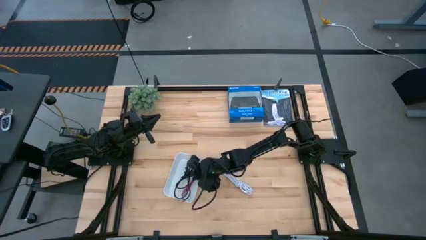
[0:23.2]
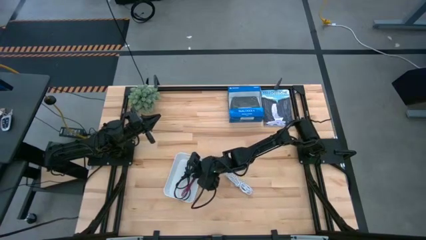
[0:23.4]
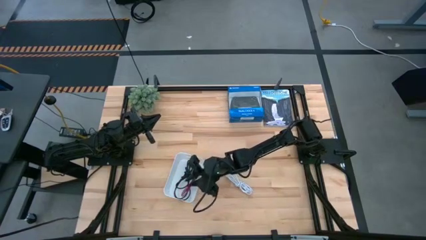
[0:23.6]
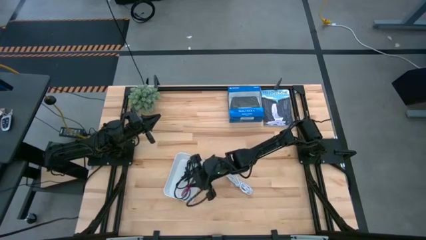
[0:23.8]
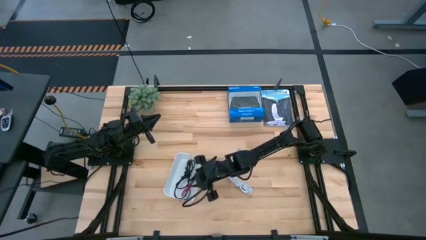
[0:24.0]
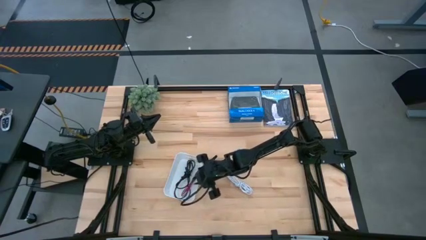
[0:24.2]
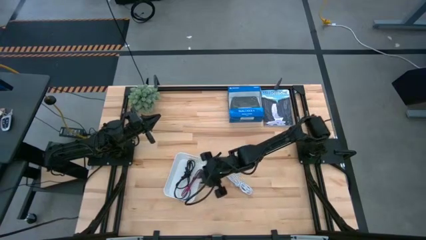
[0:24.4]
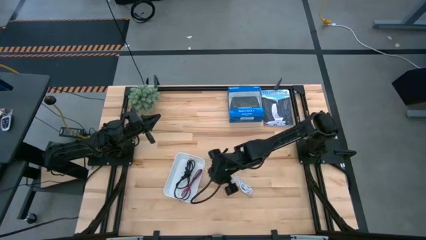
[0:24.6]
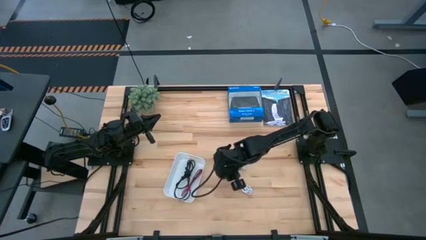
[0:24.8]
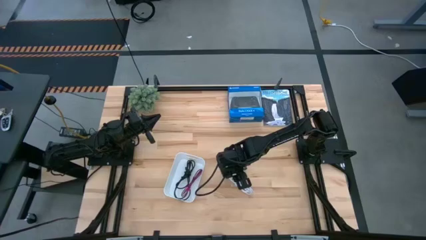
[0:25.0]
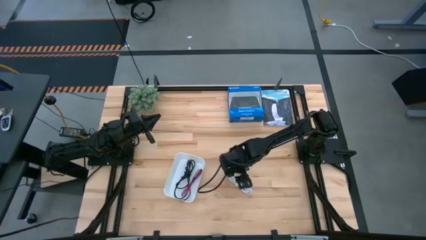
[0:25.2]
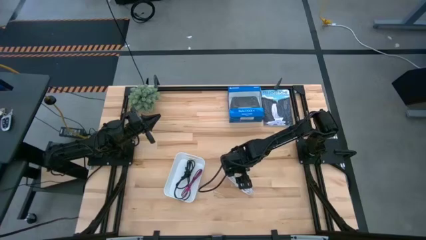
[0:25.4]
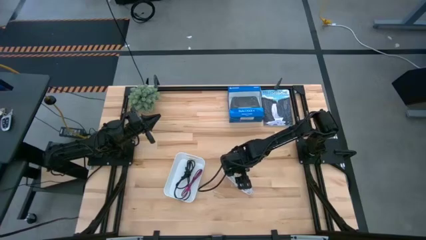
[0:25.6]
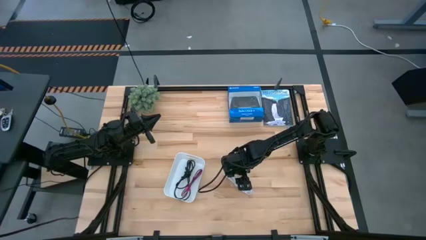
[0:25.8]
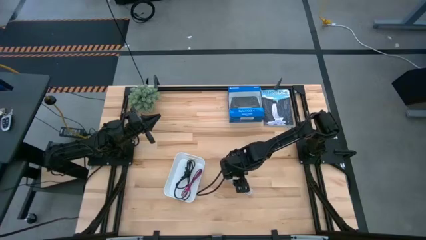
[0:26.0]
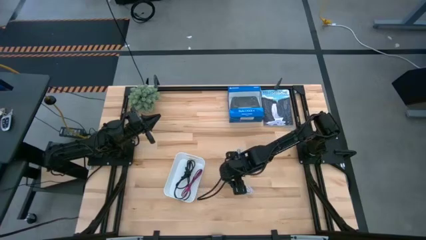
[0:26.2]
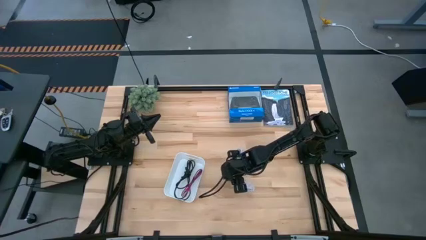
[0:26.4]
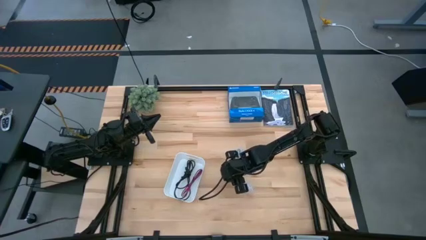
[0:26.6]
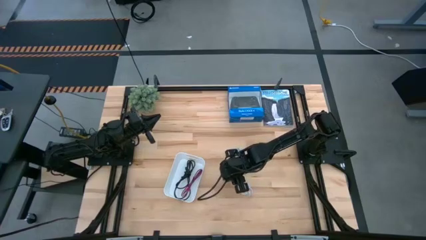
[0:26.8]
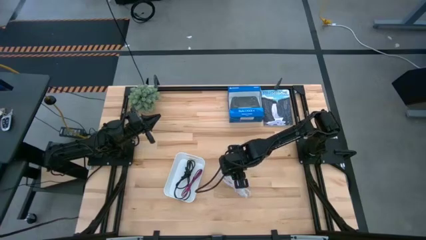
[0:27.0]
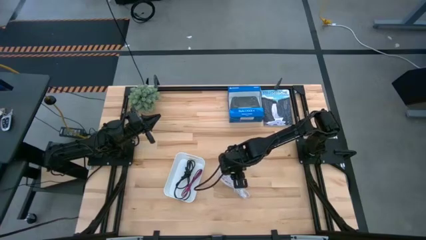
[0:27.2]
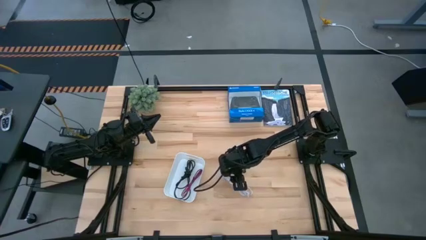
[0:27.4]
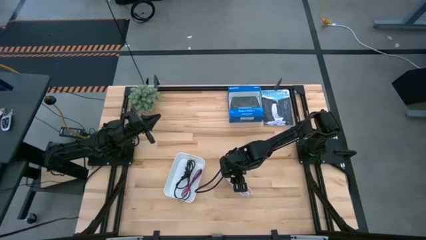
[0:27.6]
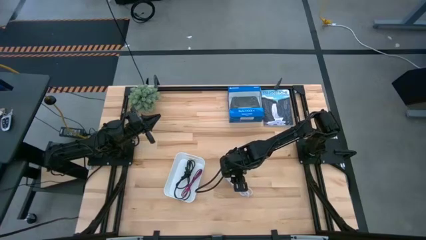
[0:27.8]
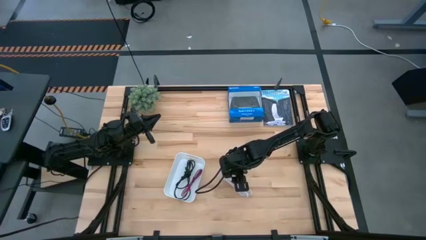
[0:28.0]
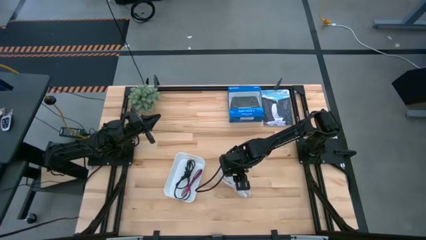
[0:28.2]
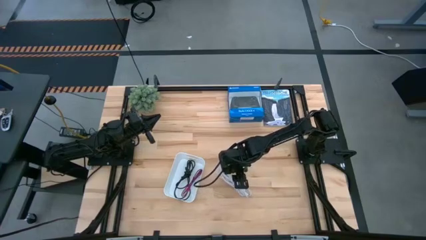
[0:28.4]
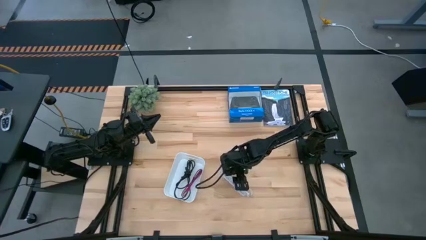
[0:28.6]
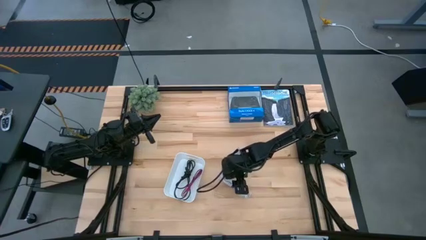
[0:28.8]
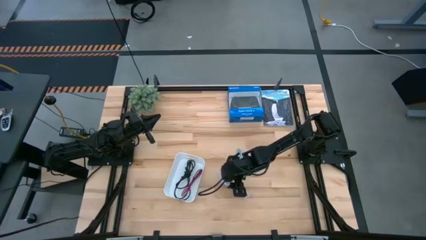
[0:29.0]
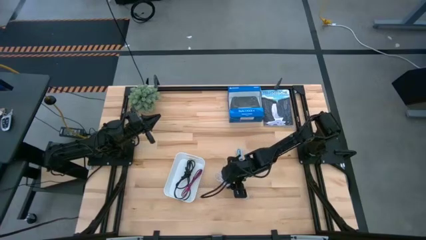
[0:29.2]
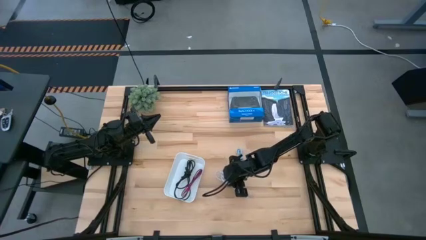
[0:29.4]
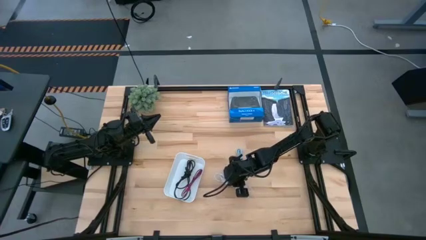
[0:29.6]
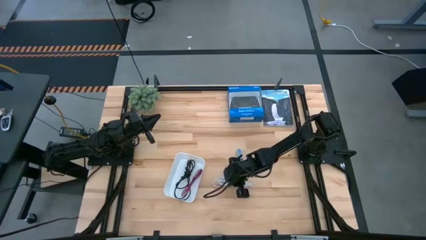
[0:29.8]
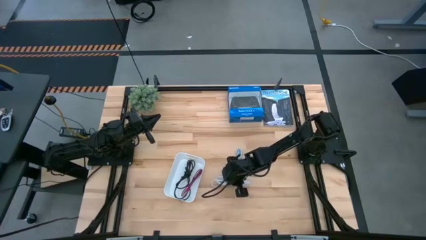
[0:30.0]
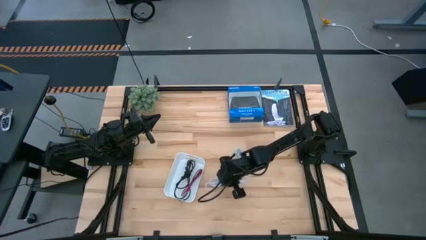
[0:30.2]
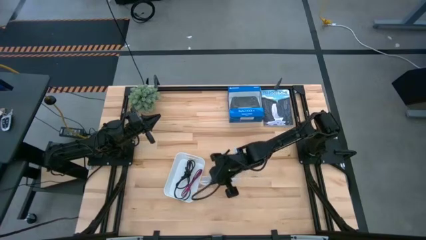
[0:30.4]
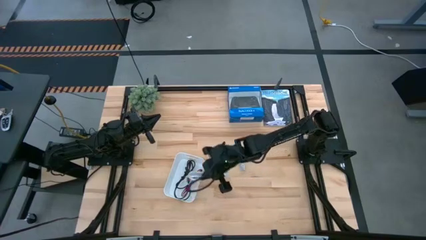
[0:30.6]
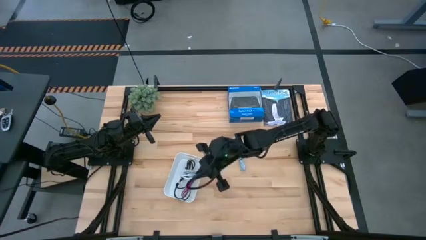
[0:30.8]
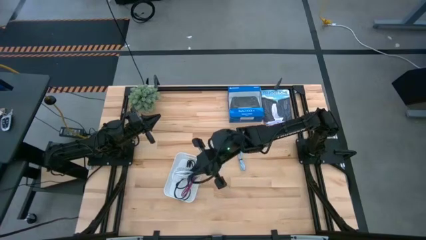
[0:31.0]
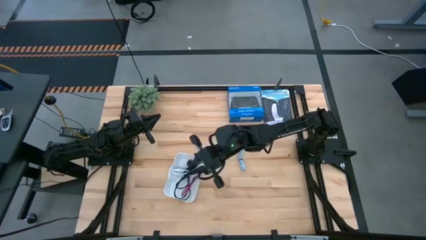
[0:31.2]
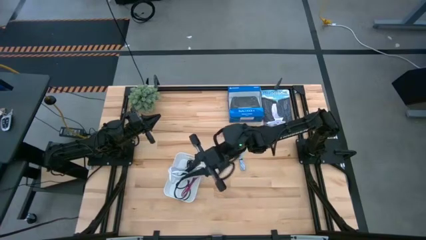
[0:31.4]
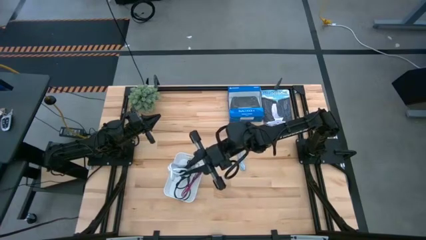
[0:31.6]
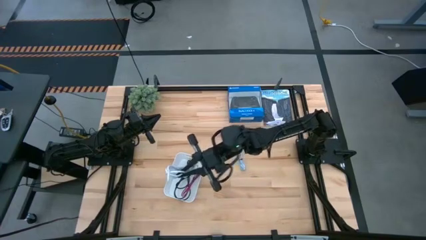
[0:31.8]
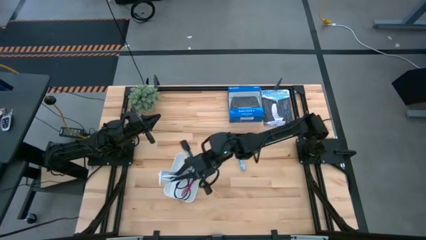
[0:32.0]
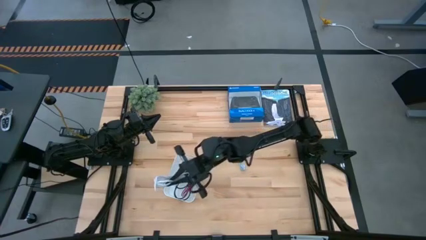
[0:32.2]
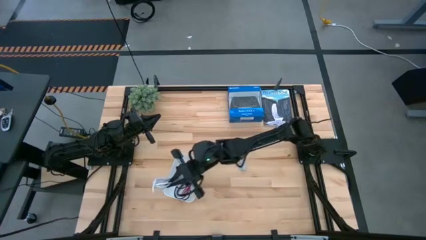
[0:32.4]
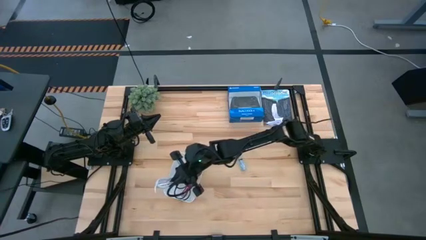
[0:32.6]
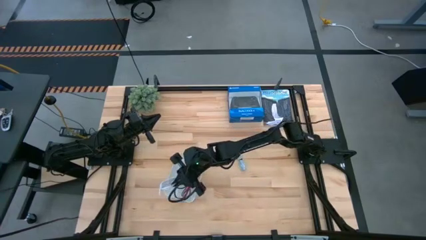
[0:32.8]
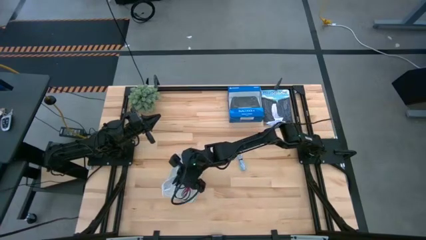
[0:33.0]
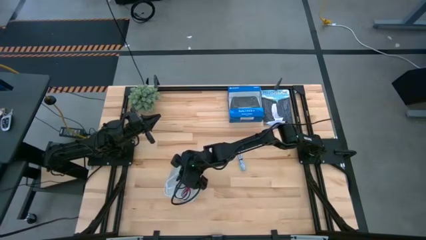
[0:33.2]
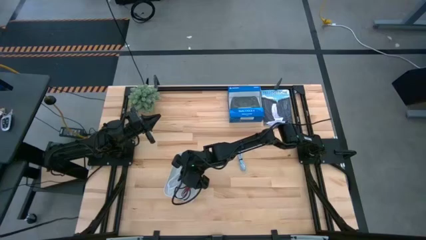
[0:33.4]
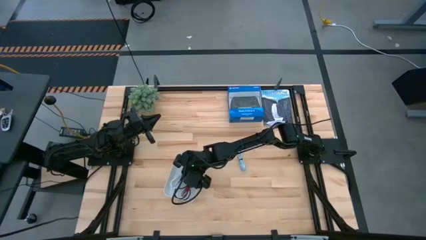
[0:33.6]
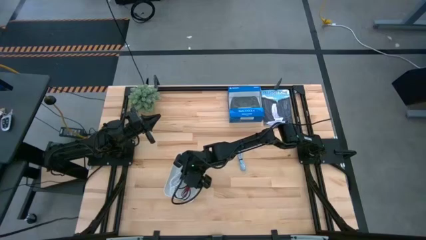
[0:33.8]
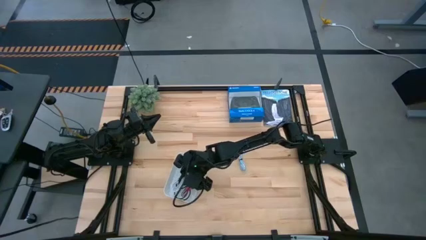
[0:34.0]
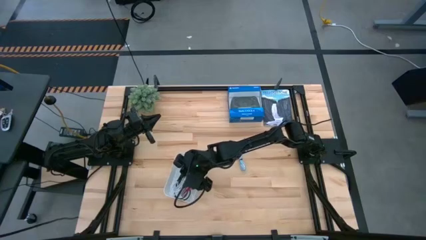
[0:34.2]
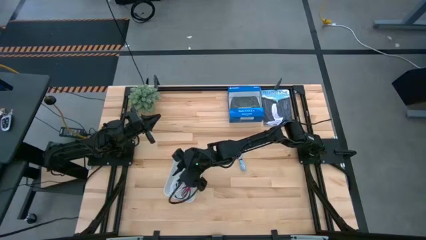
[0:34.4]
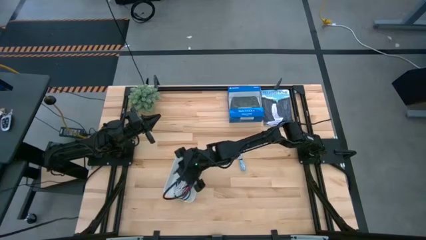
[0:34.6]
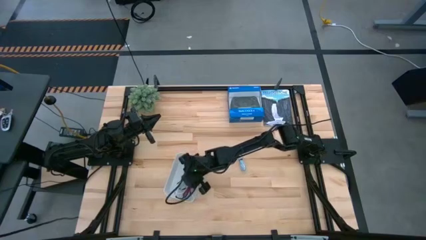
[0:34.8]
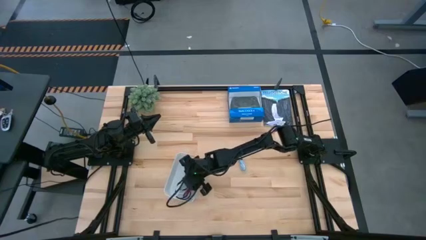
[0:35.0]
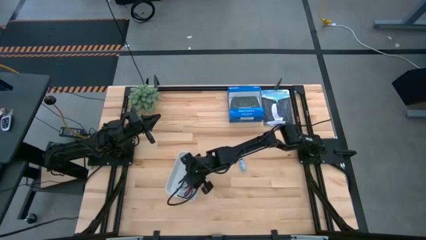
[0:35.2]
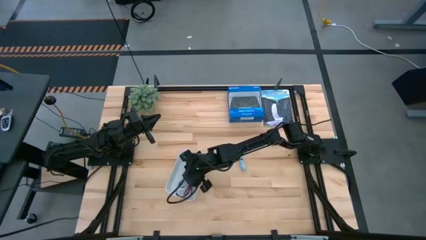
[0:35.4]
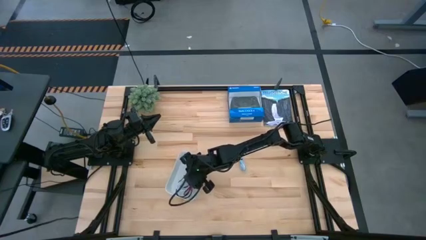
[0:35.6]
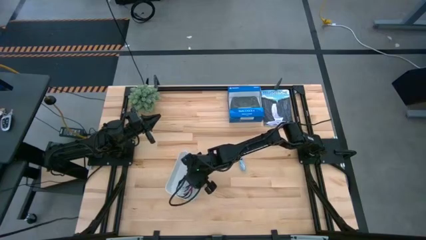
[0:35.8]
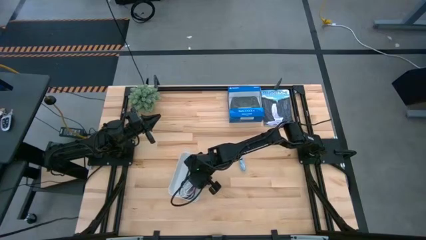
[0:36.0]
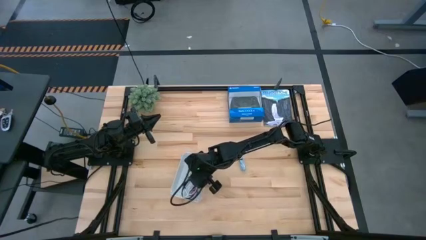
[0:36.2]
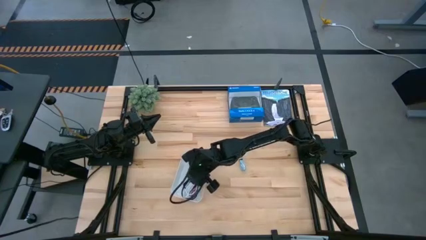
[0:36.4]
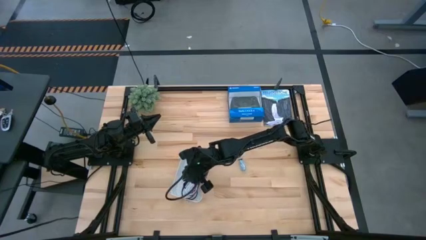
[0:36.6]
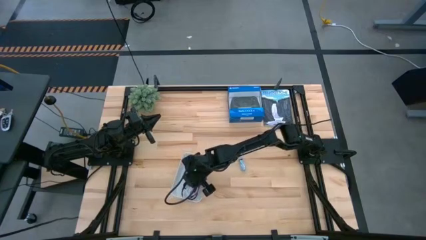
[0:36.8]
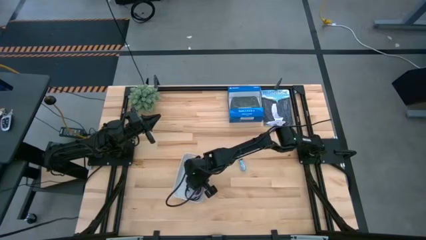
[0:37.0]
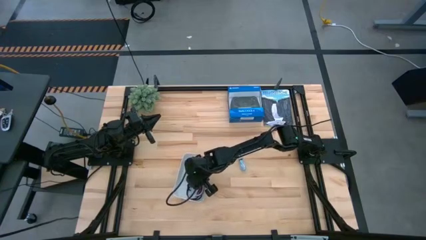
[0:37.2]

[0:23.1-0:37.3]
Task: Pick and place USB-C Cables
Put the white HDMI cable into the white bin
